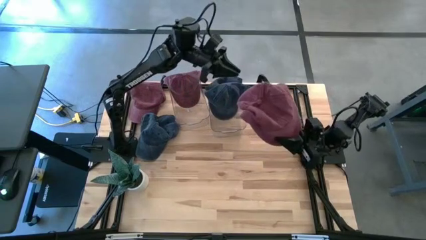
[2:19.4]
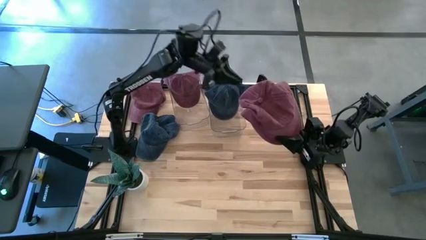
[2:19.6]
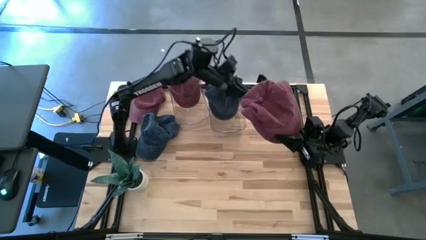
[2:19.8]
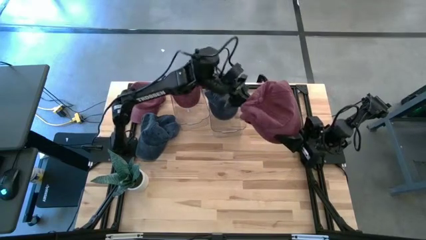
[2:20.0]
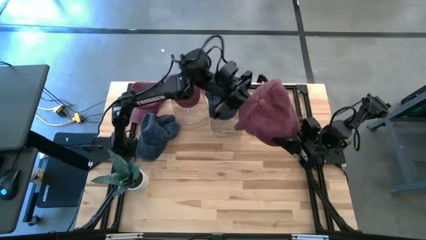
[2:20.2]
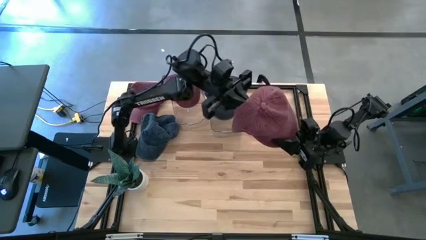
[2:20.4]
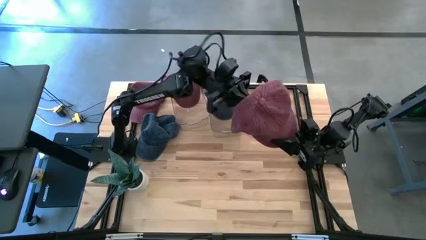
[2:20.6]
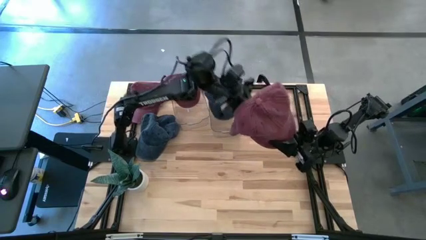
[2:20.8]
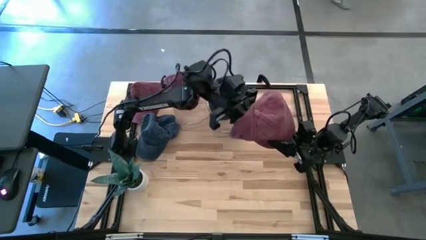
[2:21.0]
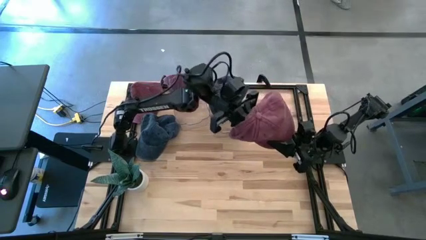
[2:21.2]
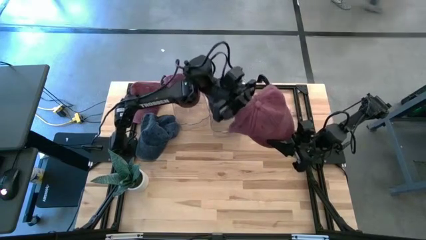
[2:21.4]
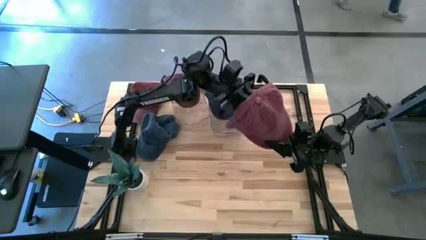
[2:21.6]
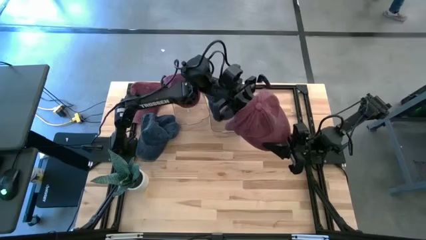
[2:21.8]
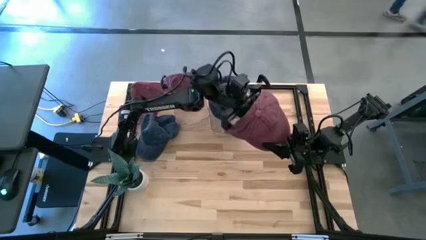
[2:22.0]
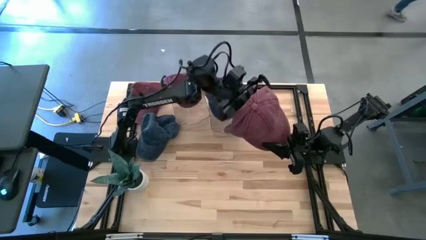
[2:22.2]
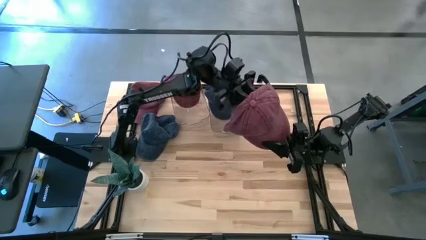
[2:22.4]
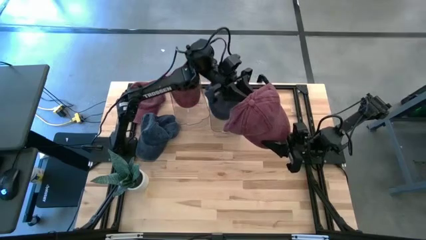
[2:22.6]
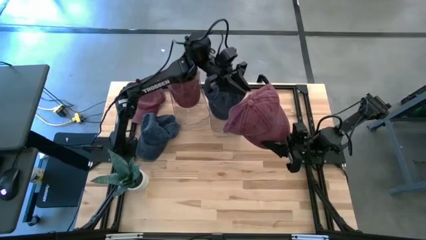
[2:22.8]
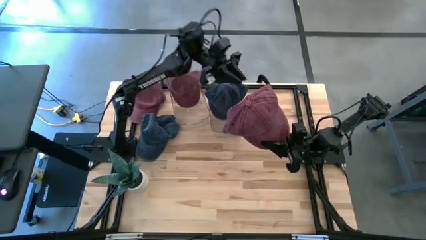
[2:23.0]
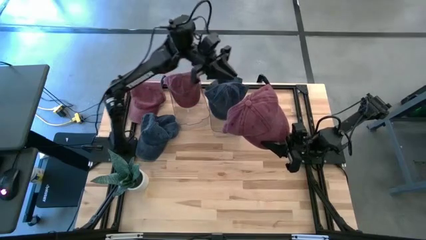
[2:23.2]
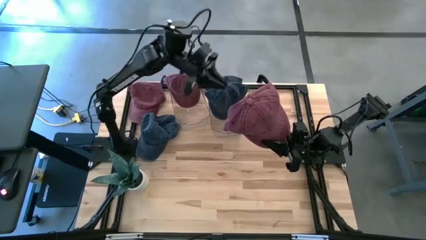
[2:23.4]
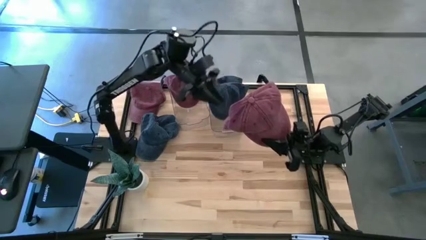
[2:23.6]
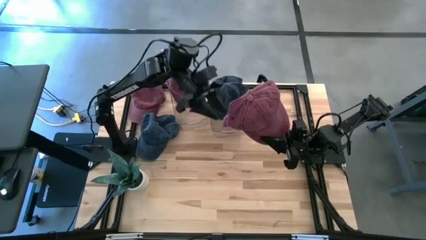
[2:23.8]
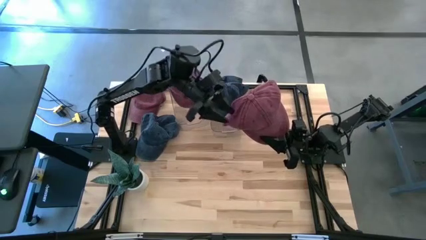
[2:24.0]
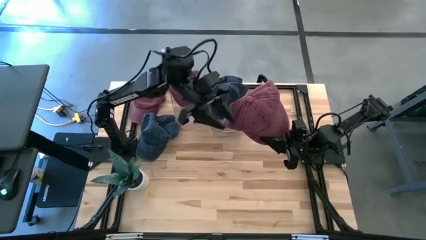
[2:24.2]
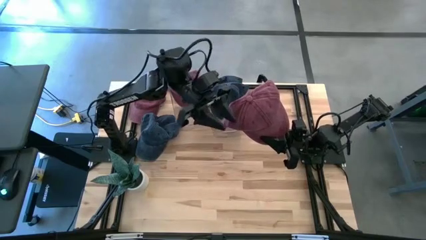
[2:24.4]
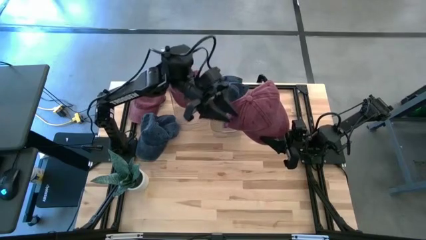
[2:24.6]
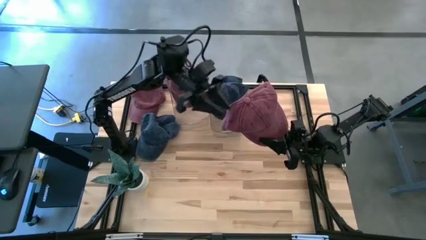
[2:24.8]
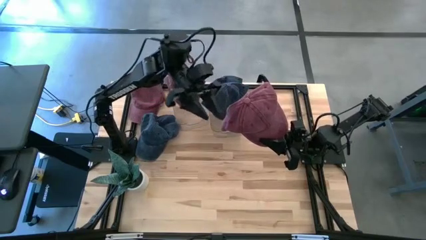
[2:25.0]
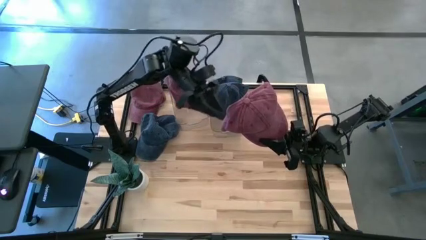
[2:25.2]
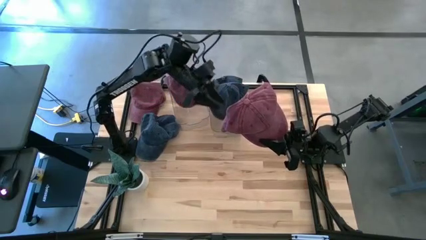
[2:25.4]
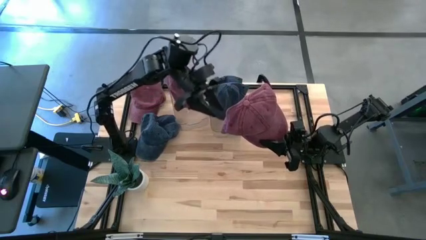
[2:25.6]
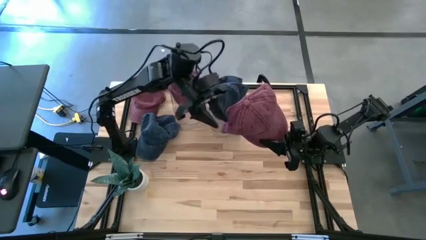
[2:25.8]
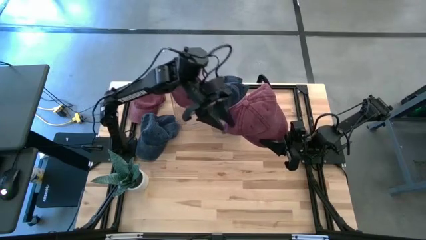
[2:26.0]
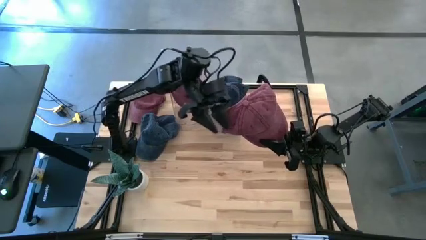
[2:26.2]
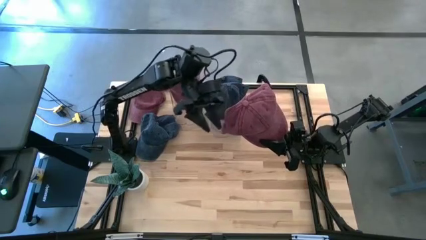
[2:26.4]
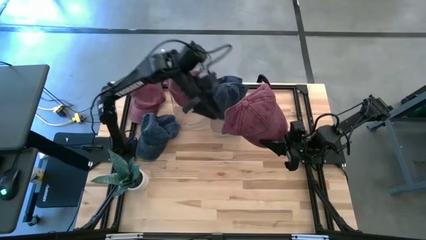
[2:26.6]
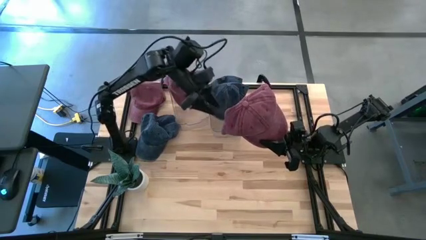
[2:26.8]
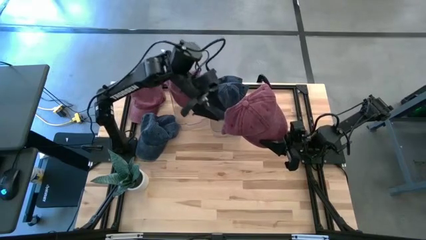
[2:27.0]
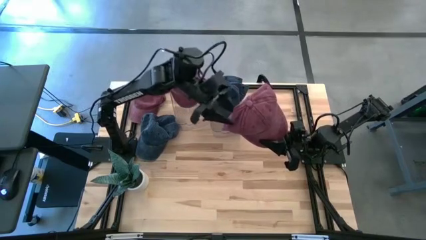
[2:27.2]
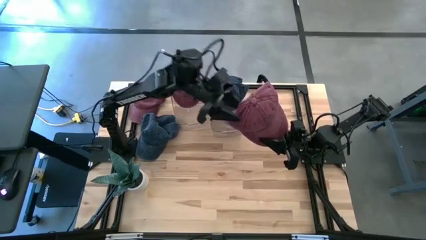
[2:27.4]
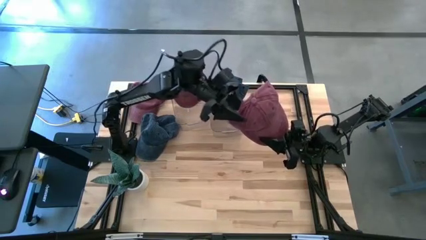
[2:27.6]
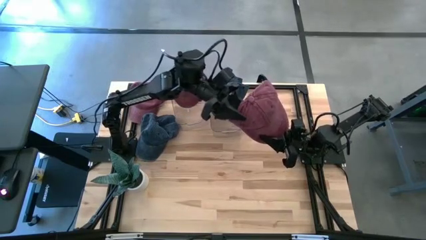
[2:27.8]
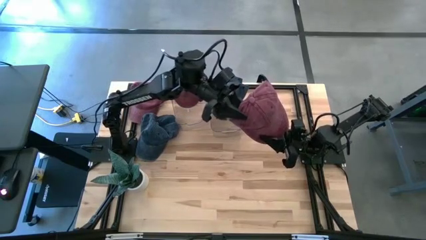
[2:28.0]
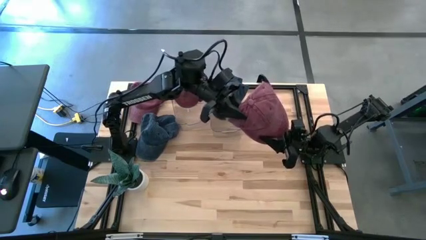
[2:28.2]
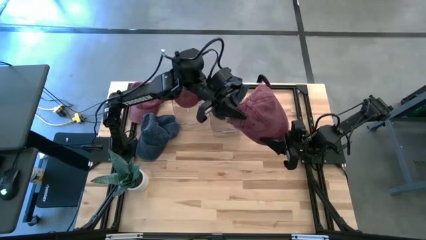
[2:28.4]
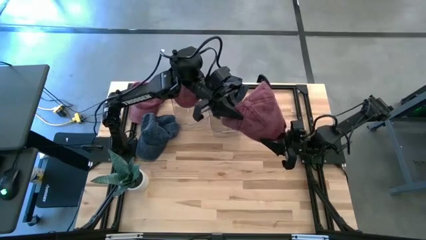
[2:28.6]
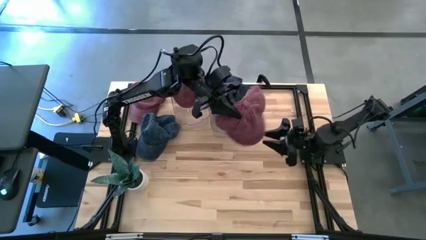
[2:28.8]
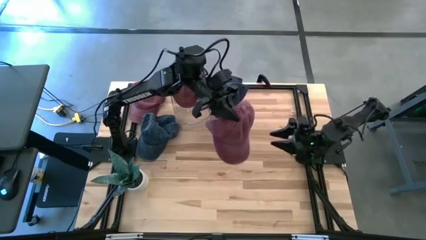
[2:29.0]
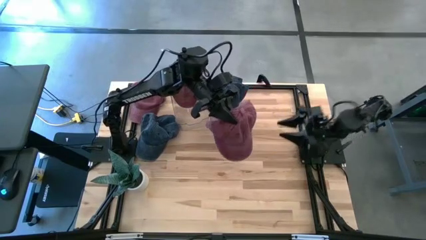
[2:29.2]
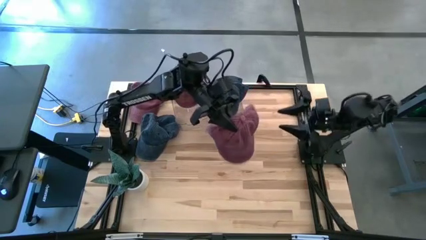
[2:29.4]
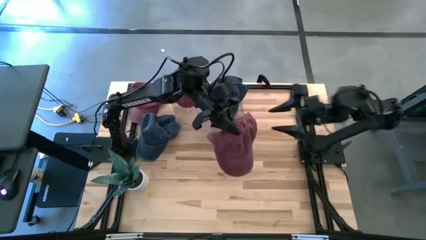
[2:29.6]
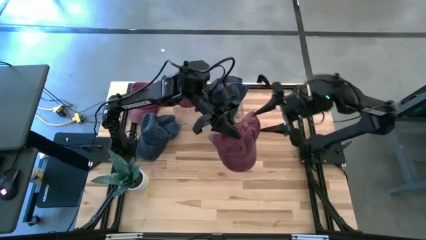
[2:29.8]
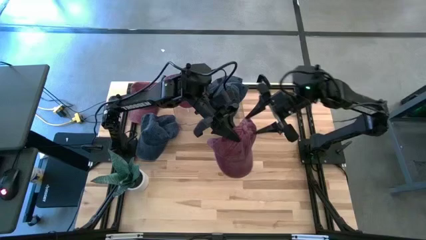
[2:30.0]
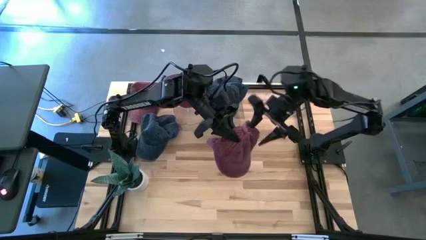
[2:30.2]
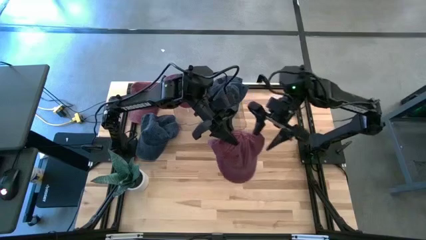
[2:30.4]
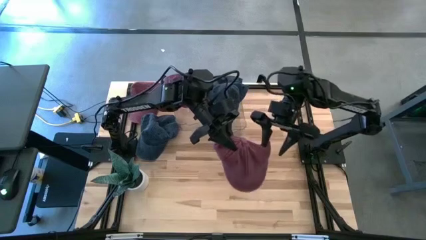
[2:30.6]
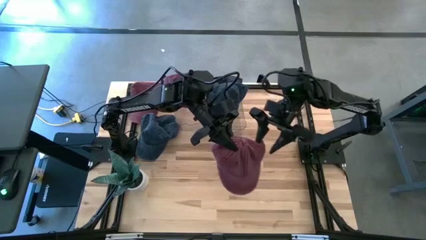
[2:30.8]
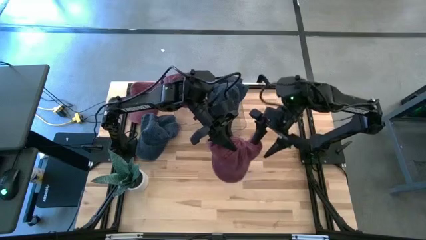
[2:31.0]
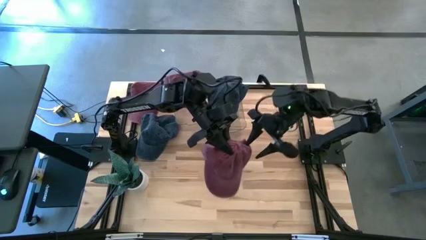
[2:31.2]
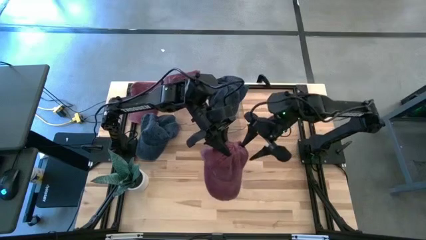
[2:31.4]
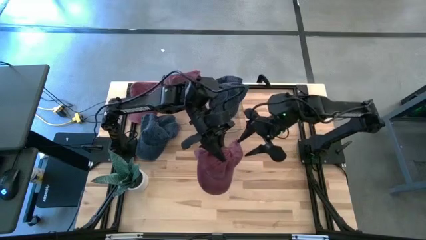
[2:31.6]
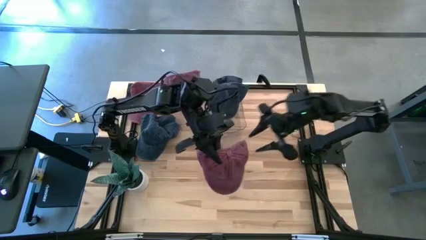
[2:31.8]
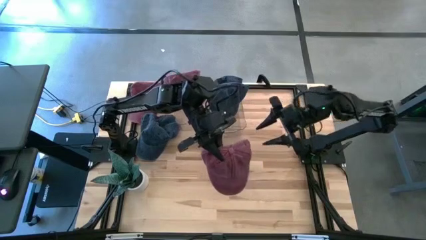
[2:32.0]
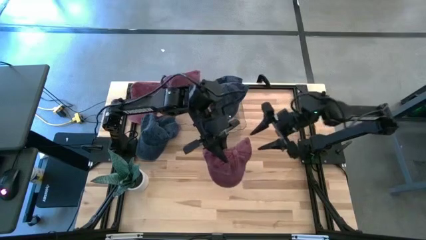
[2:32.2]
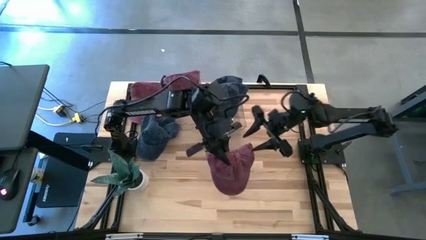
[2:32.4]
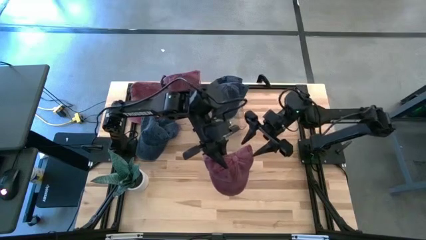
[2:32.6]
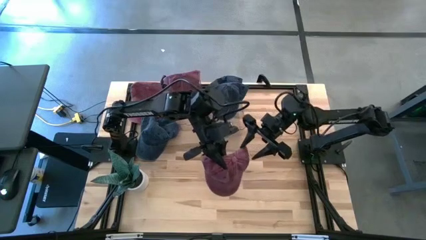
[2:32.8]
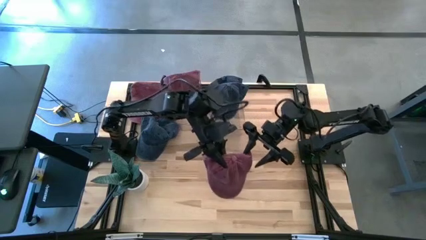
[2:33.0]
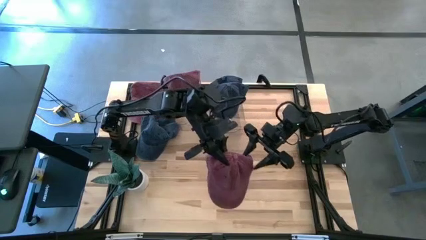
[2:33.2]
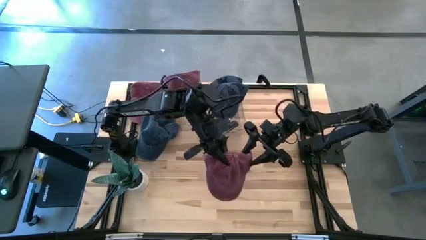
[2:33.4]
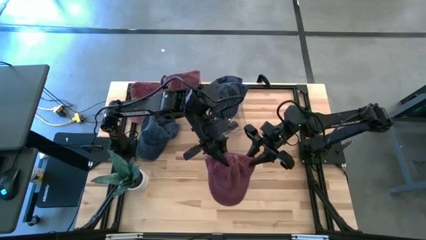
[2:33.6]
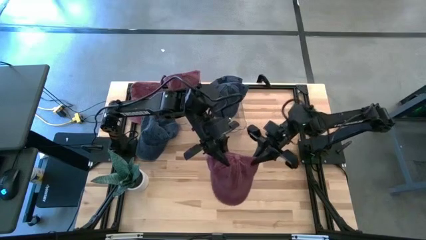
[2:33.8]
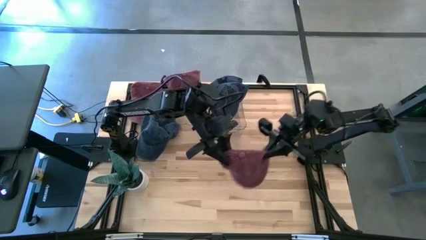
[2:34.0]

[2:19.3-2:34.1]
Task: Pick & Place hat
Put the bottom red cap into the left bin
